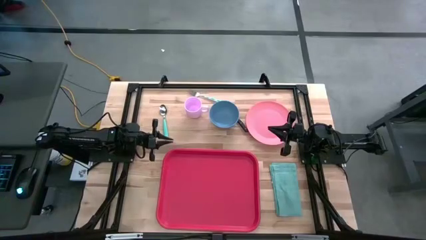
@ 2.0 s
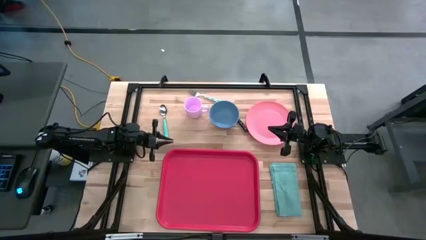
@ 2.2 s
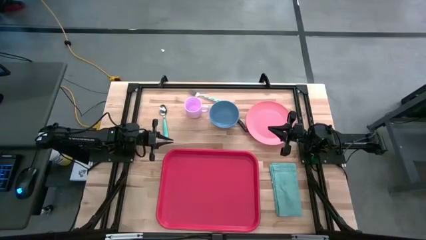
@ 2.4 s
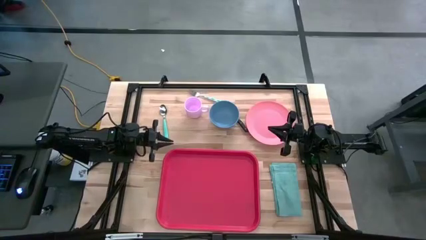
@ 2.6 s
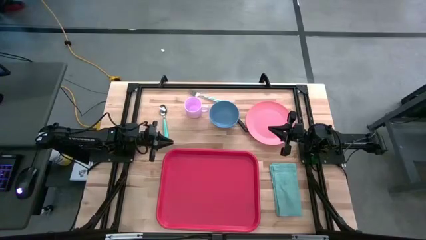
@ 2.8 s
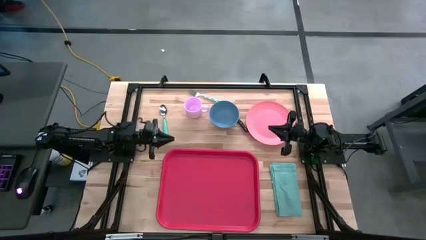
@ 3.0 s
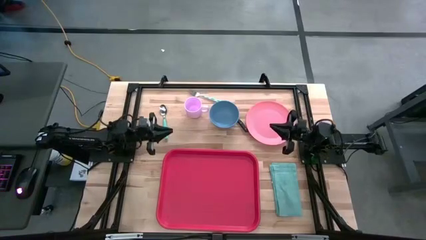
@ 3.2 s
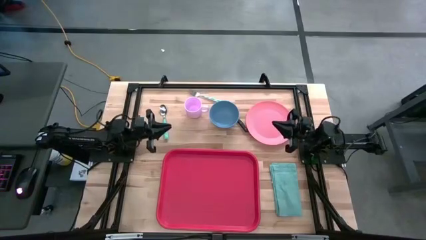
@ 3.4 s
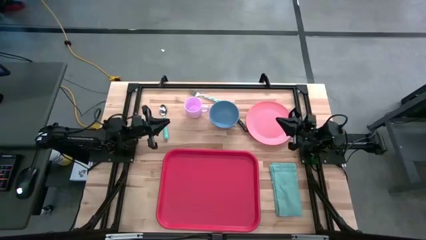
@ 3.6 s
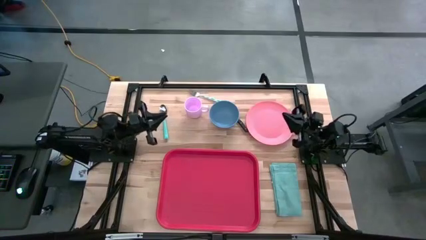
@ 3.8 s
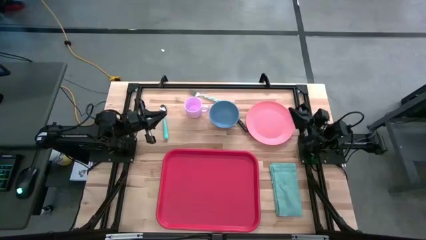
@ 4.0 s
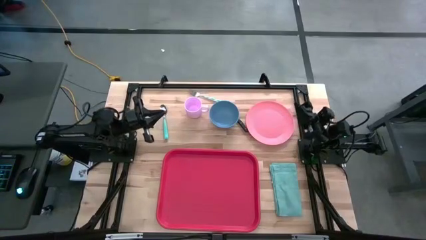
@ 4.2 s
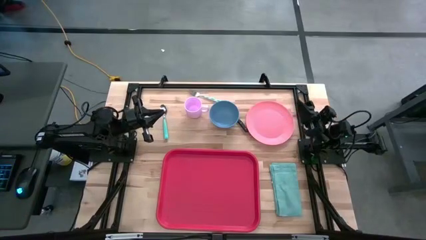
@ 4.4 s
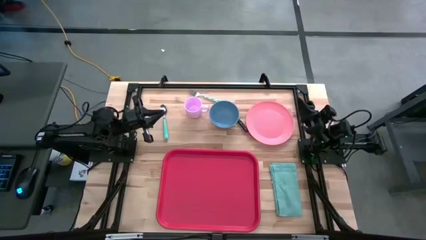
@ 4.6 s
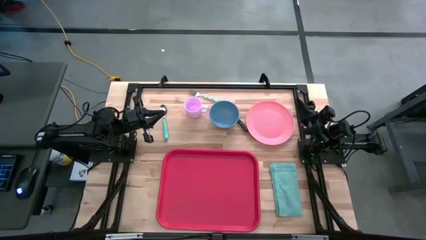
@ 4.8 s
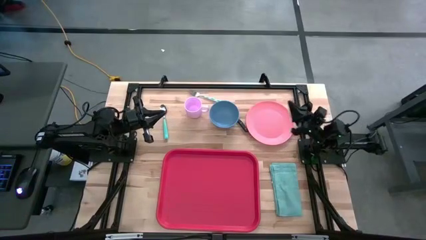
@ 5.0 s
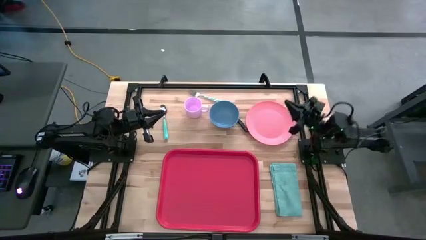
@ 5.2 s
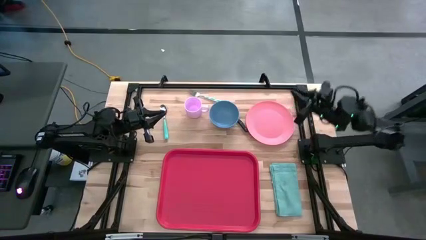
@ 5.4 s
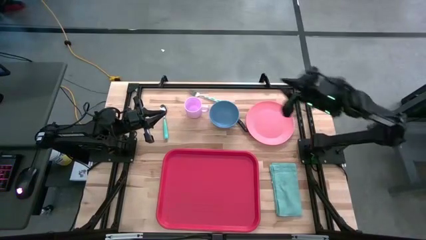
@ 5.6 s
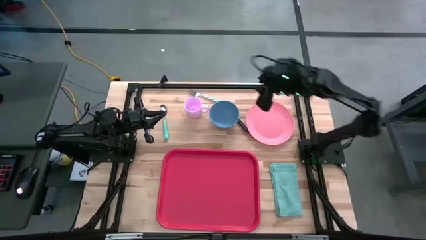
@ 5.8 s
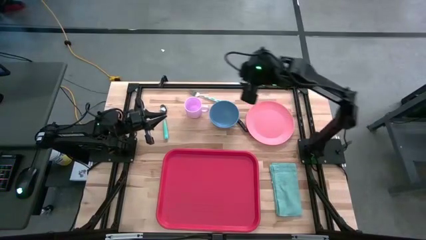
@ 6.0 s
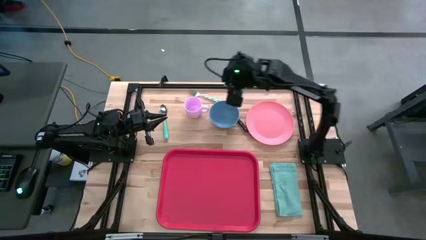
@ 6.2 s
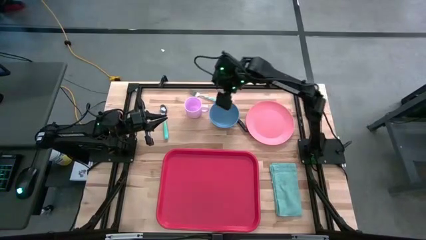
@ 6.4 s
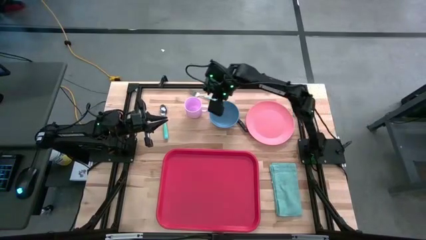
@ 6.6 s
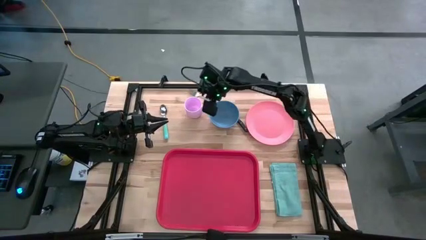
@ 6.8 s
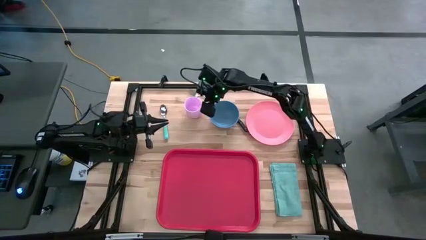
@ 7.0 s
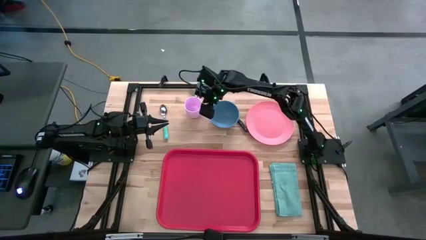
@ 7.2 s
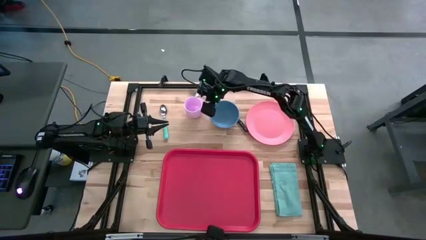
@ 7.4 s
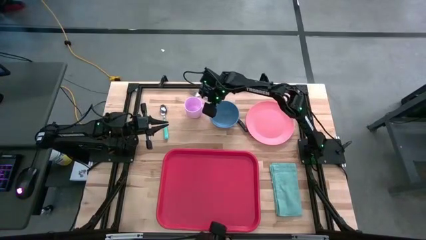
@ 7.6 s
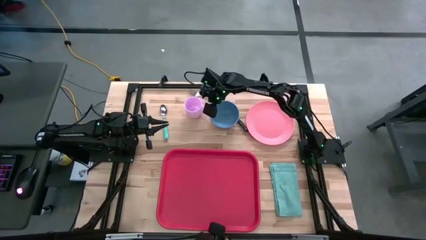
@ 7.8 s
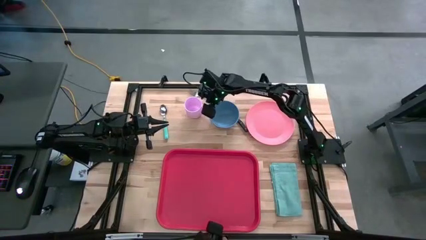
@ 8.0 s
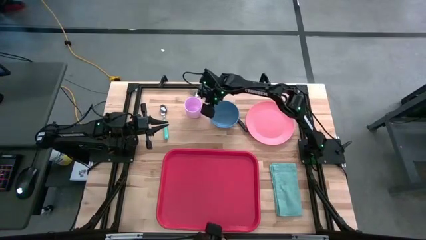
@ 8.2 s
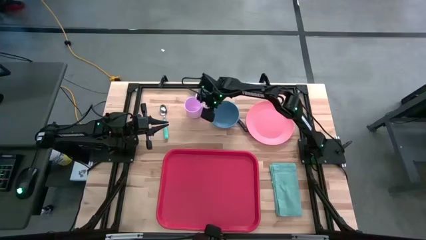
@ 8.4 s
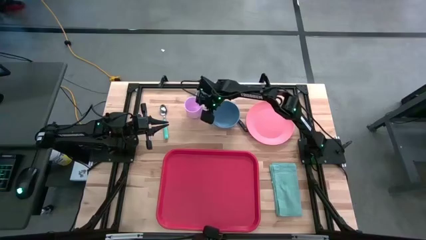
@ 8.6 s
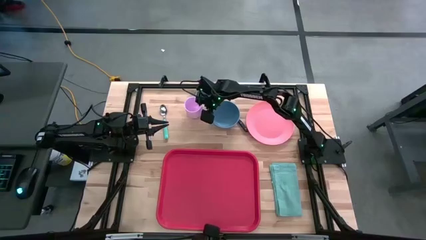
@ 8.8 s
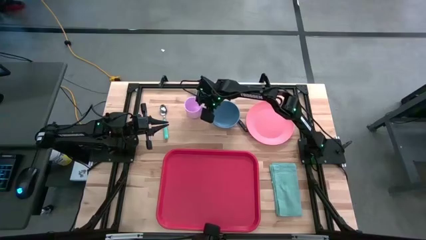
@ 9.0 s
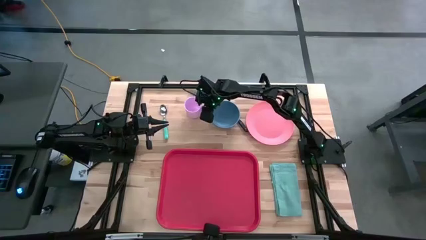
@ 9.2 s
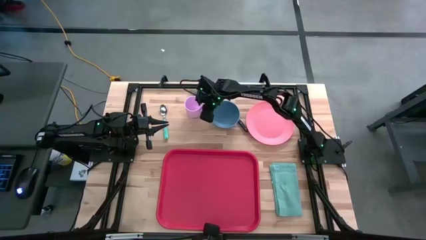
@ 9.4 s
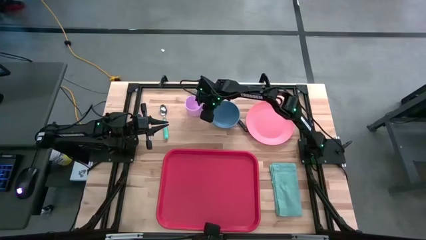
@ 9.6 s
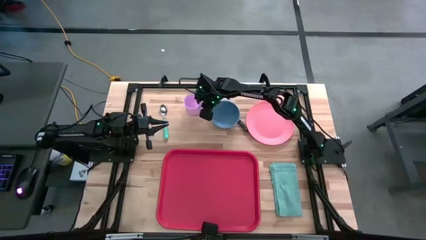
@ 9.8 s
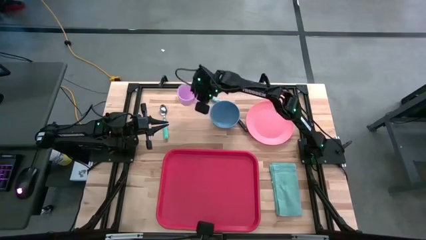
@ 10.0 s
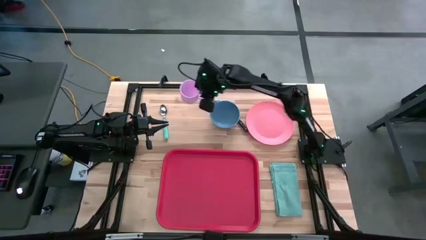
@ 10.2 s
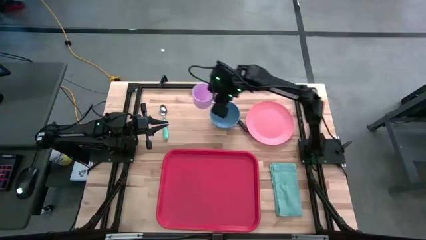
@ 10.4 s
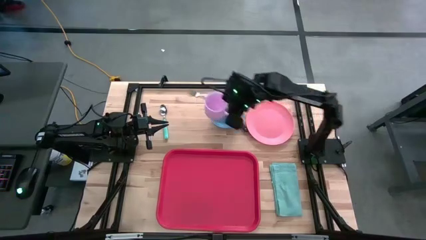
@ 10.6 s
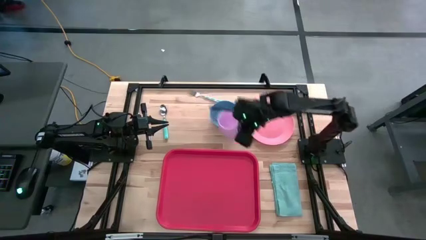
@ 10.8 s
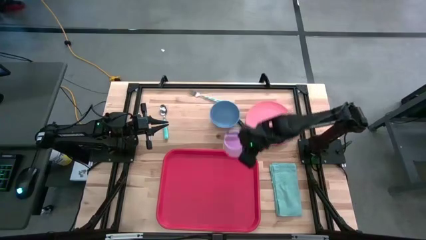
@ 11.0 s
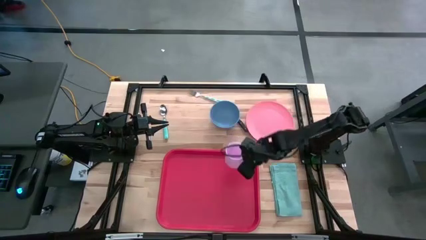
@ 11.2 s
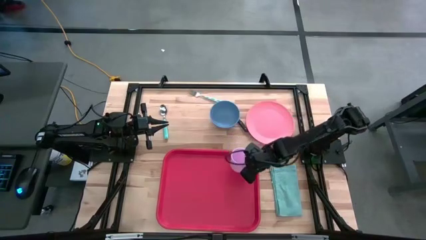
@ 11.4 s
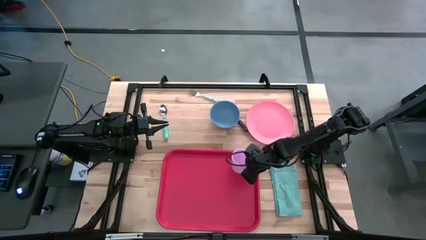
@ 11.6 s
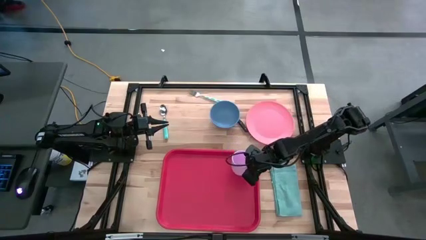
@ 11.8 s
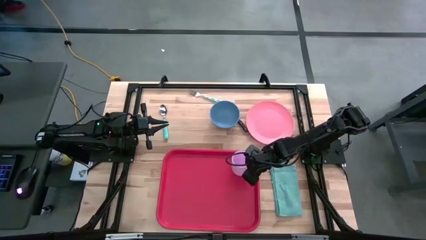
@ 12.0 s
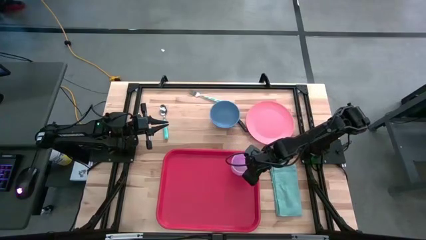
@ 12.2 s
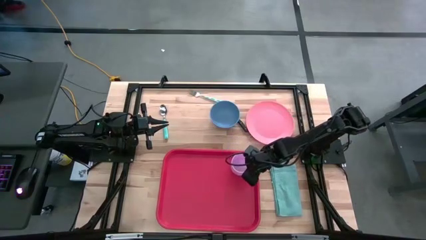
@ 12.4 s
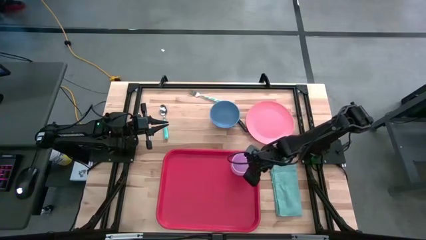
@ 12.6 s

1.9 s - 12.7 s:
Task: Set up tray
Put the purple mug to the top right of the red serving tray
